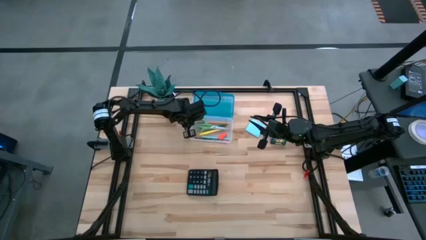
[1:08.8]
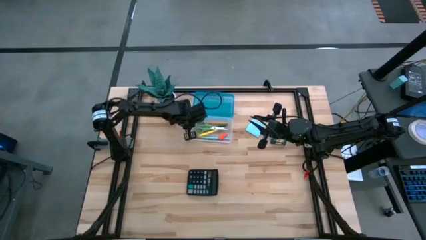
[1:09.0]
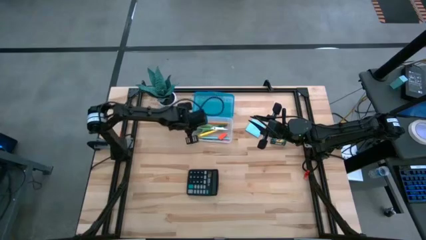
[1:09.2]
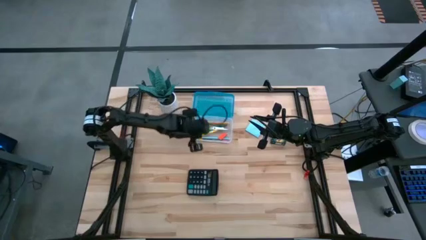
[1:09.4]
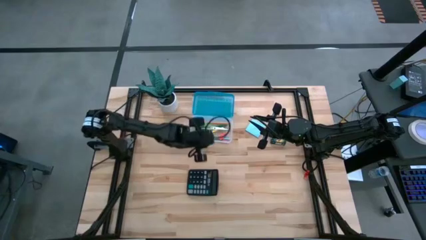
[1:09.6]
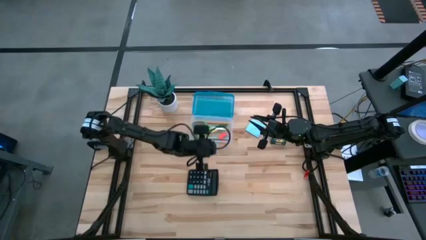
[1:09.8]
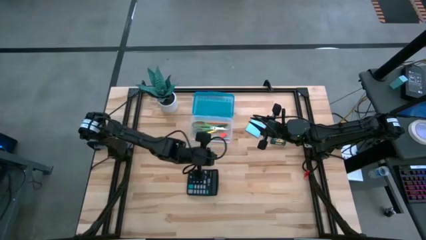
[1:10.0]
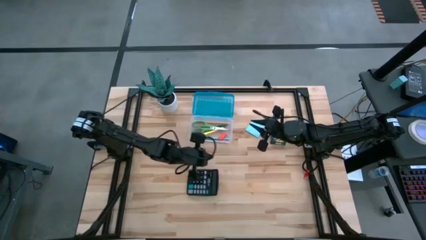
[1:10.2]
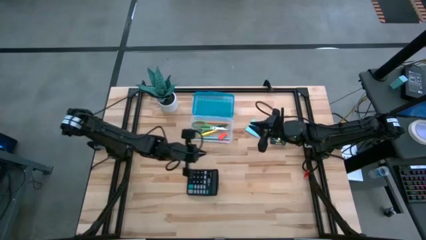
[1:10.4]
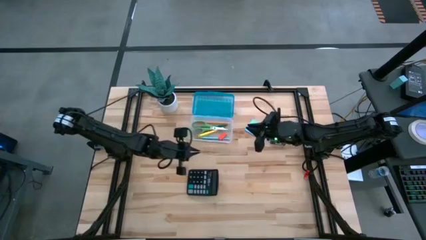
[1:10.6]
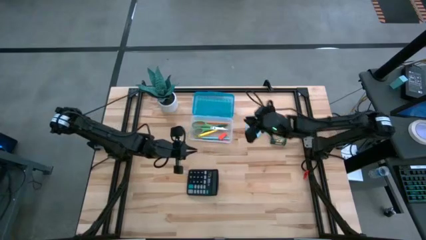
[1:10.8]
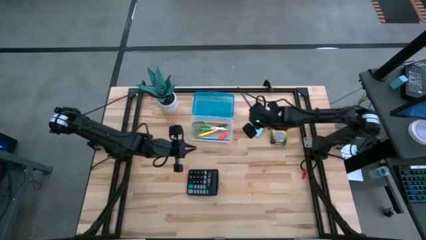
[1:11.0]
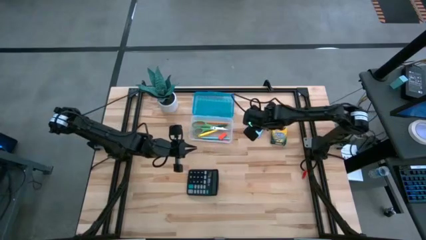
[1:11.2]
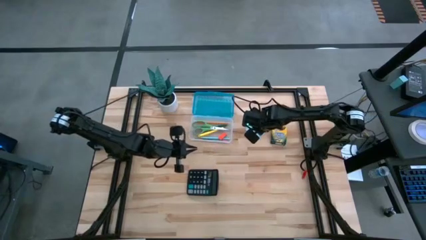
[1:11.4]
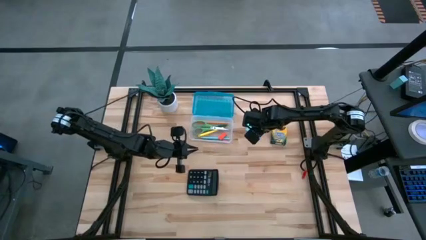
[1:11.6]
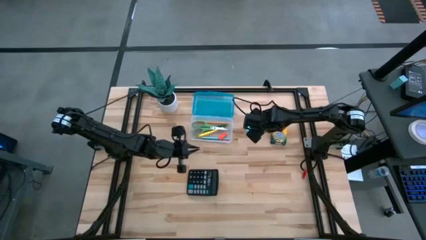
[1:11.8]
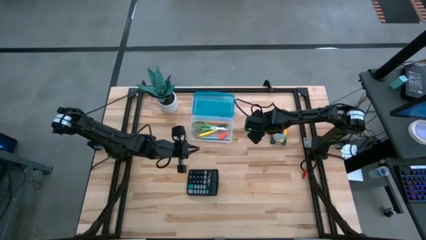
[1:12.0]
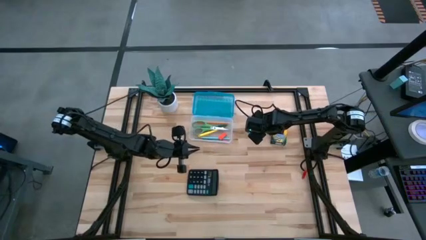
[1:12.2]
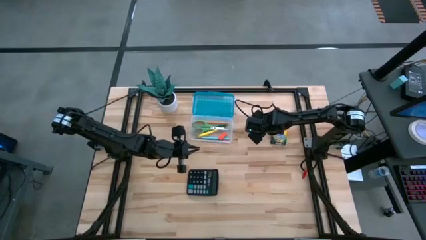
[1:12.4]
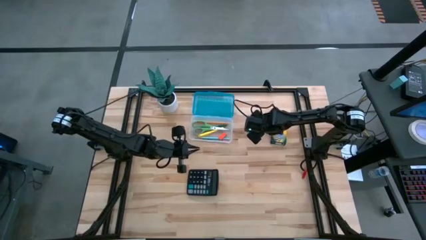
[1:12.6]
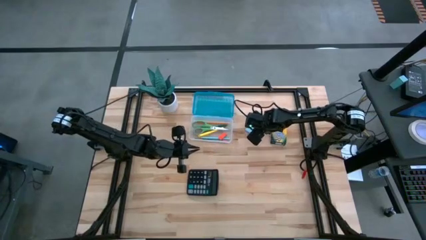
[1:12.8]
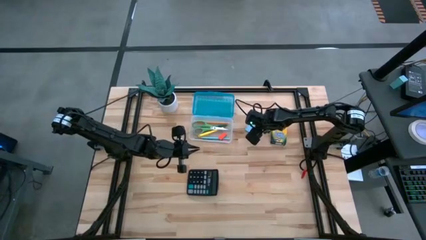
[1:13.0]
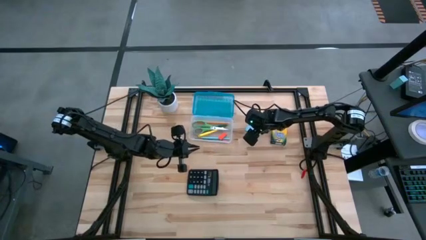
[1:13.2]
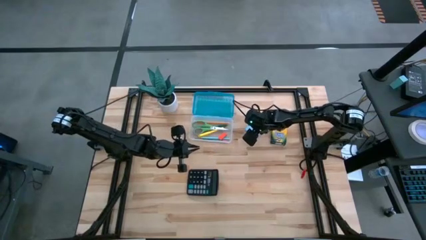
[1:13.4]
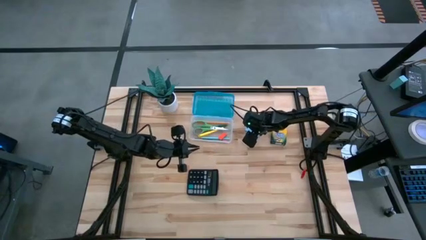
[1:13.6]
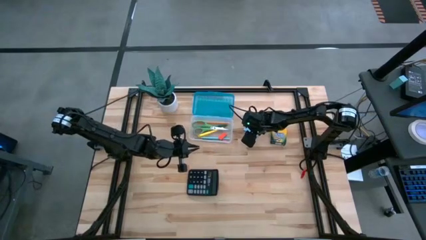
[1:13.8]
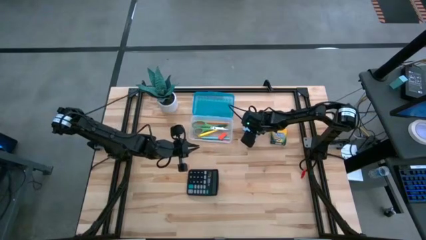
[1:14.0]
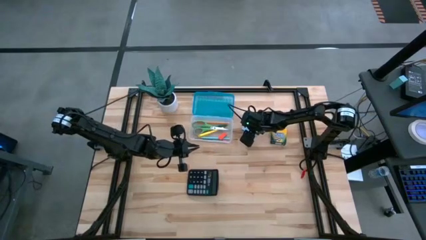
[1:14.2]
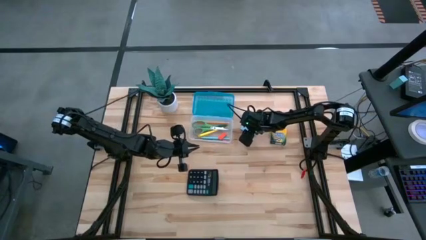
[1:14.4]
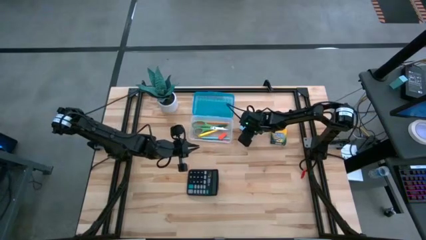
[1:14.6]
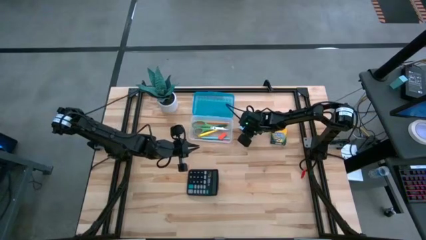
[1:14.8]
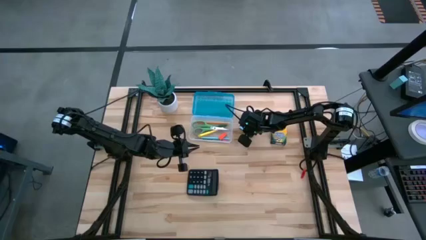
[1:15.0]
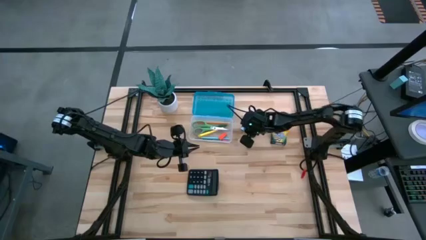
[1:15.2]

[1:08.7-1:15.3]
Task: Pack school essentials
Put the sticky note into the supply box

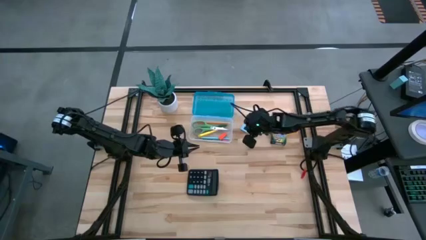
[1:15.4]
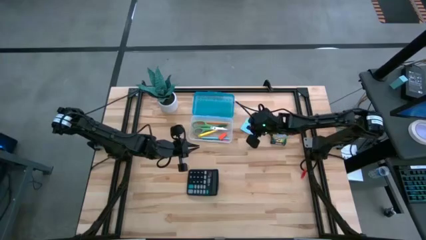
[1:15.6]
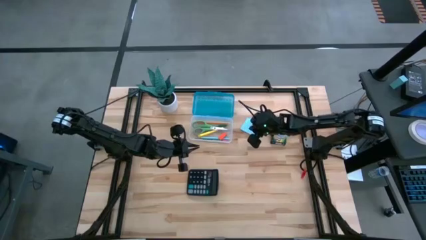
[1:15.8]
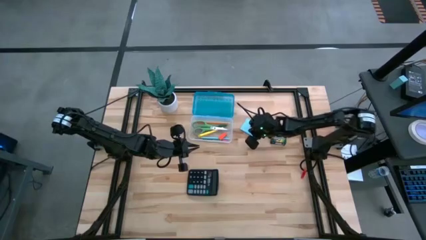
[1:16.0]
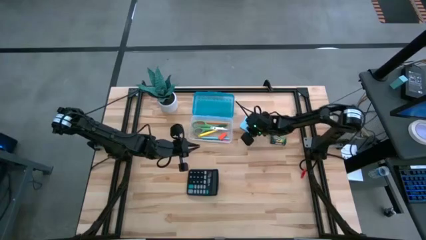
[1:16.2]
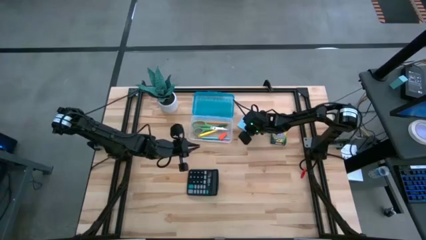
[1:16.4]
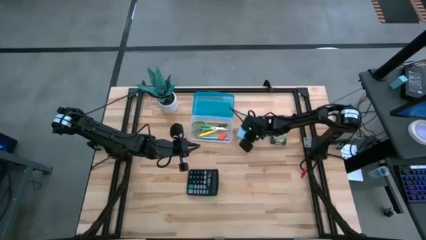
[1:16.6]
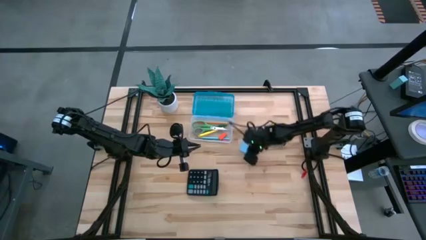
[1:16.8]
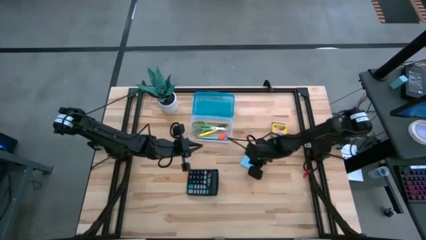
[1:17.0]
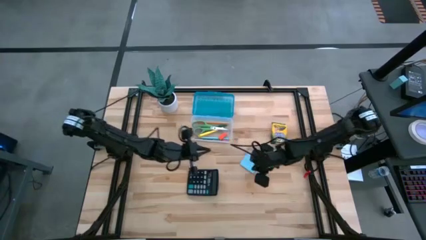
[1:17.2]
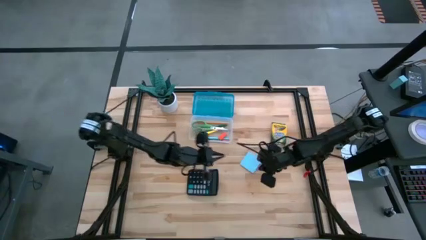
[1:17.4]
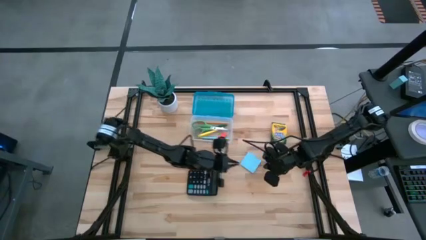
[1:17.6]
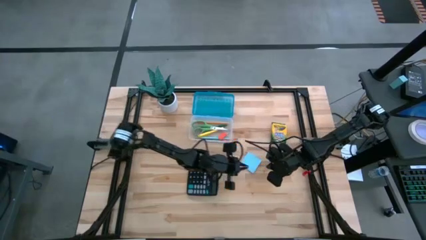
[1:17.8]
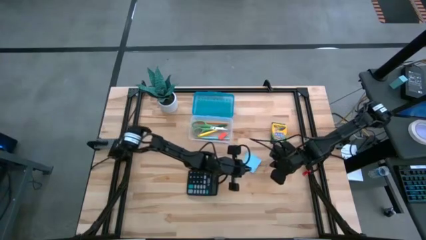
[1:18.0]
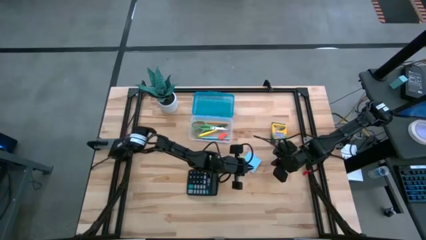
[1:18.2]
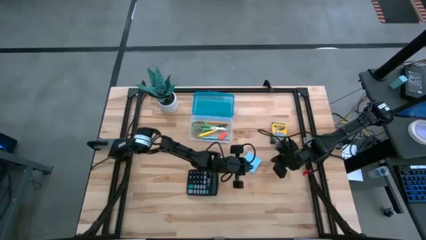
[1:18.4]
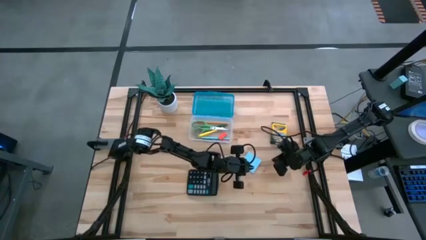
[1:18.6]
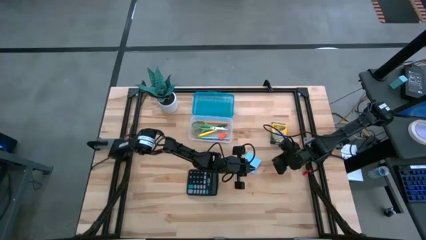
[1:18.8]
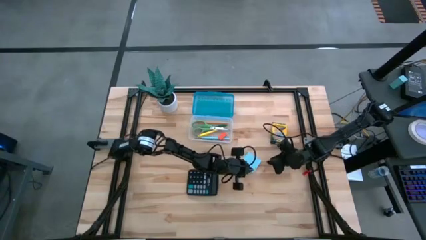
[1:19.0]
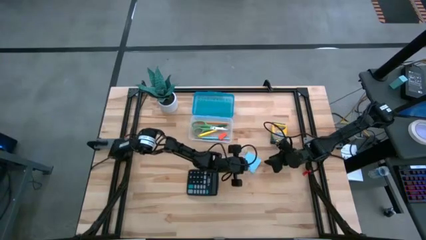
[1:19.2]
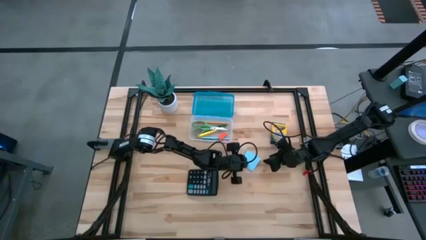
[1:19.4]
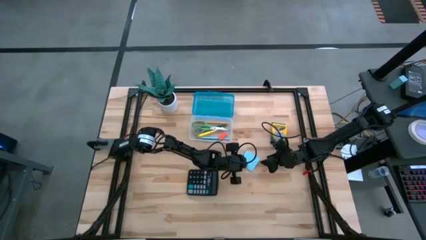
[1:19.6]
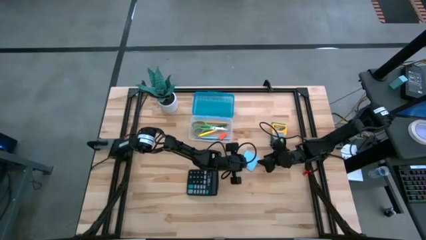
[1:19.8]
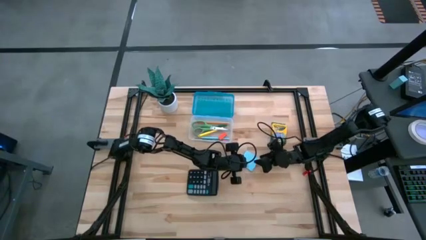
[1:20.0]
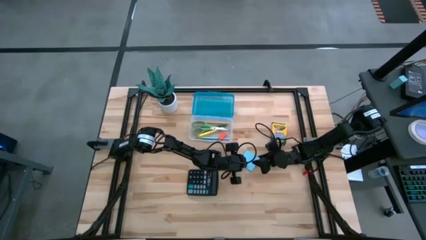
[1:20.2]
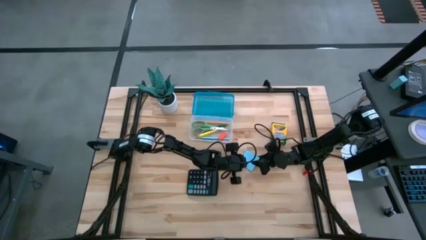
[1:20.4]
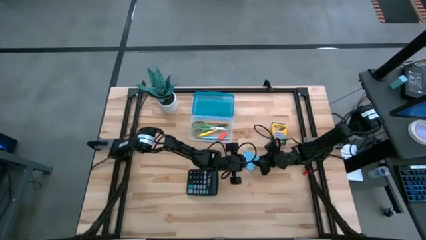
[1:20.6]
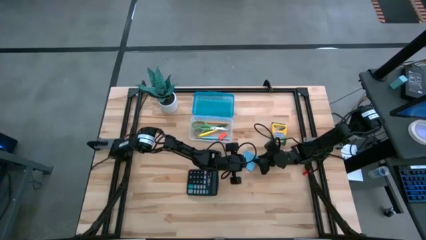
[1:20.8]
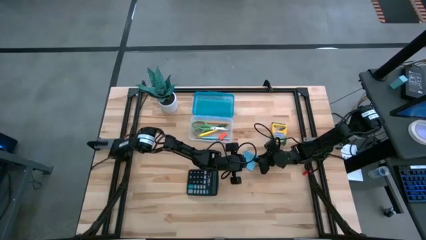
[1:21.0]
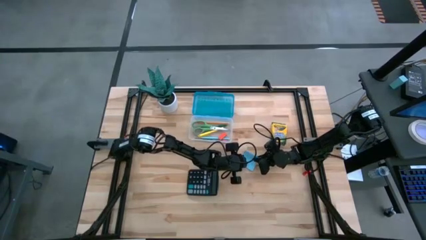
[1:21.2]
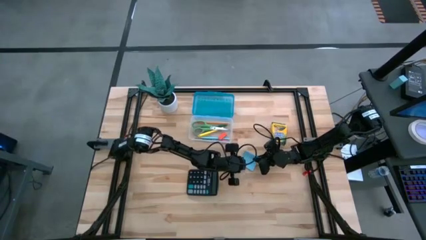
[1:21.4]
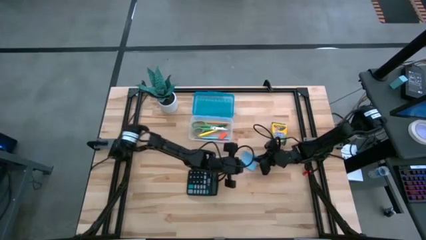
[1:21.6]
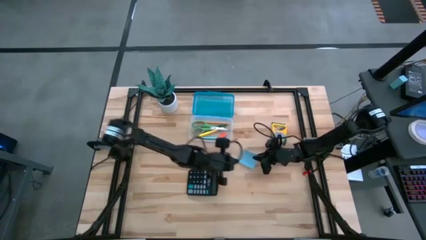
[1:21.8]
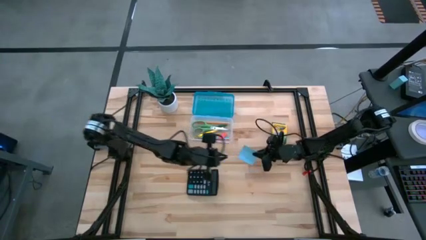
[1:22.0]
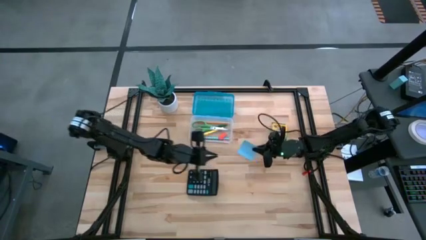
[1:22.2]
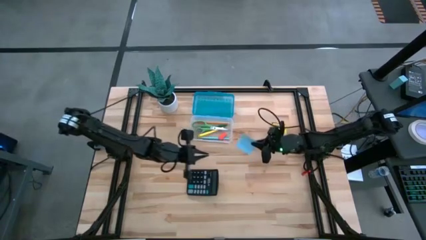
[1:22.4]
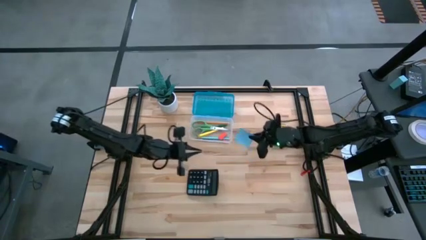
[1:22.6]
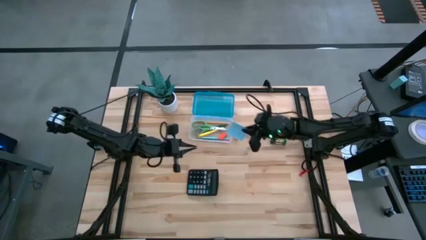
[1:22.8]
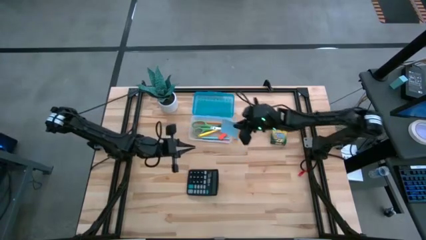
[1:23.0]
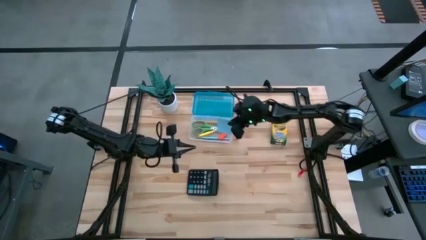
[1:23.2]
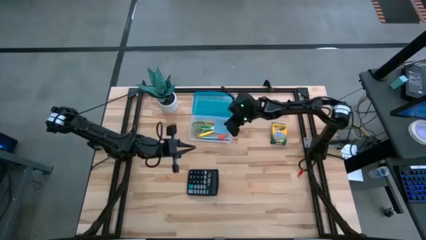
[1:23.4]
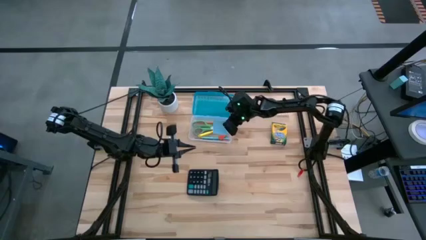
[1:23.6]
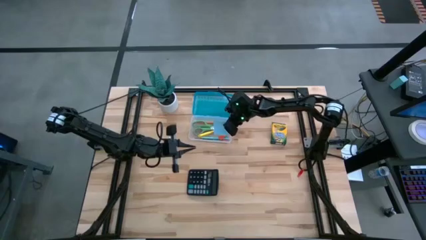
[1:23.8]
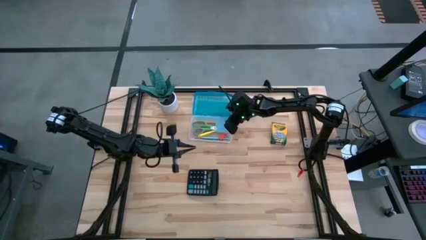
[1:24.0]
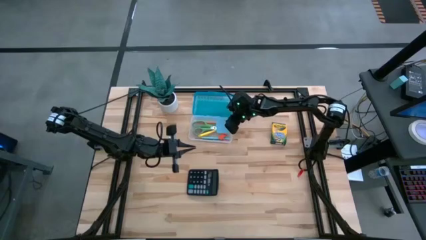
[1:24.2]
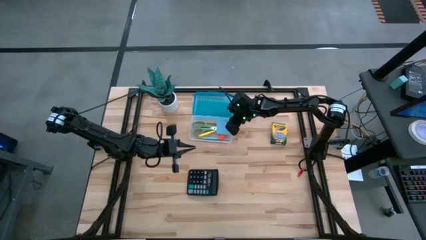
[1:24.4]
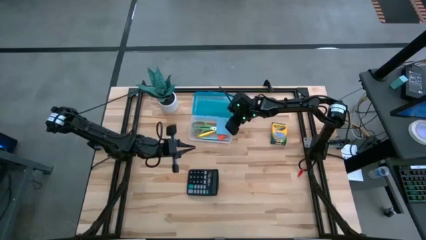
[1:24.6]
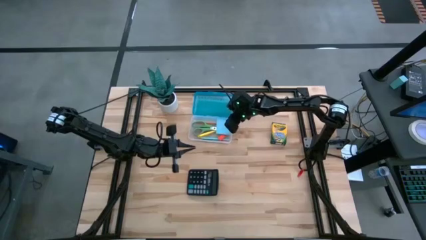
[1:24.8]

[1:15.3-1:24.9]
Put the sticky note into the supply box
